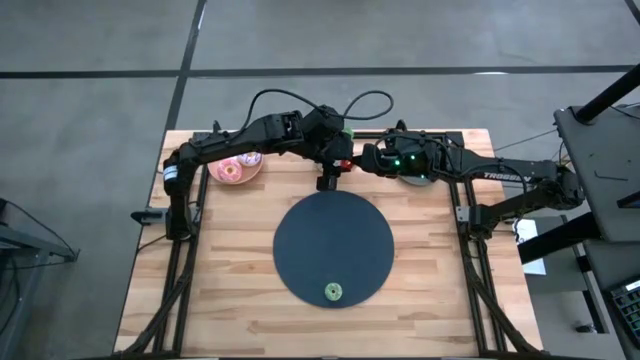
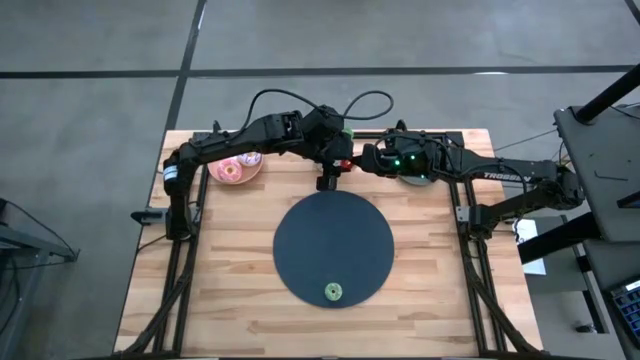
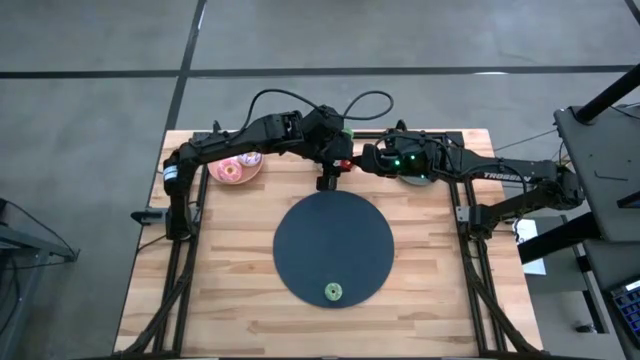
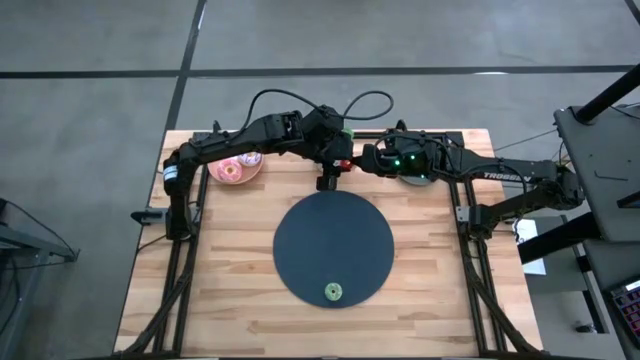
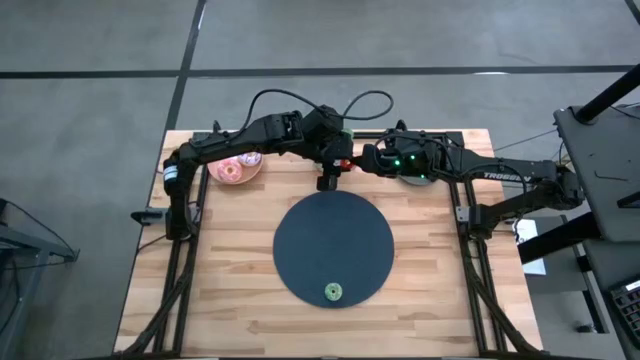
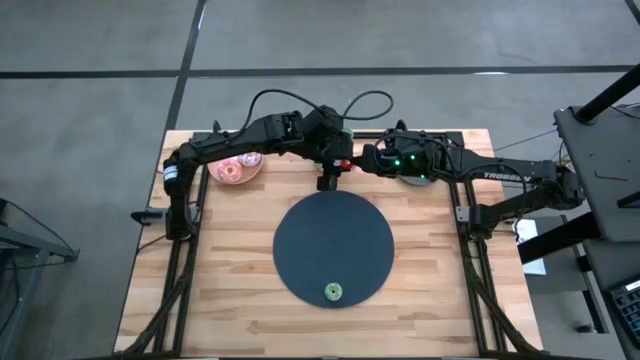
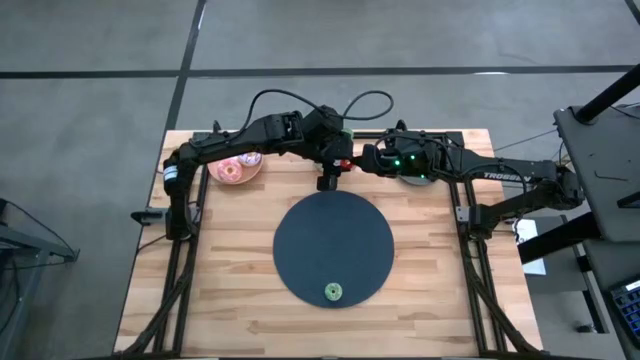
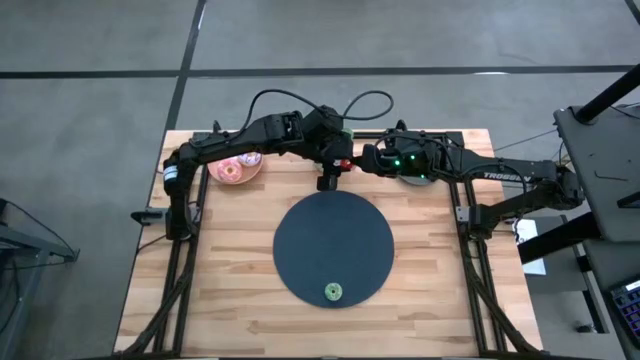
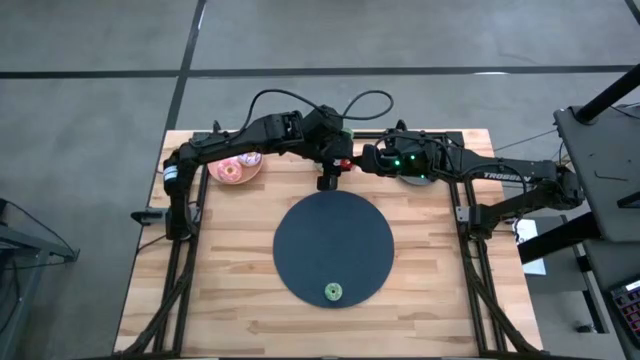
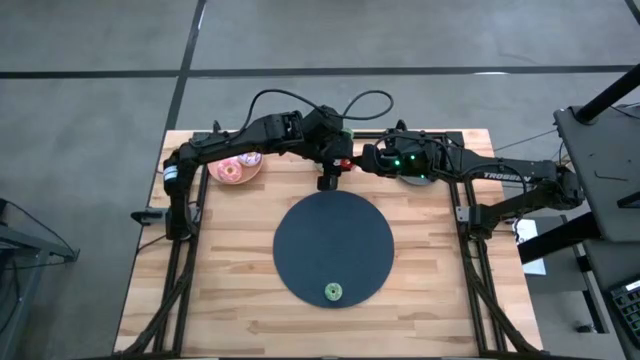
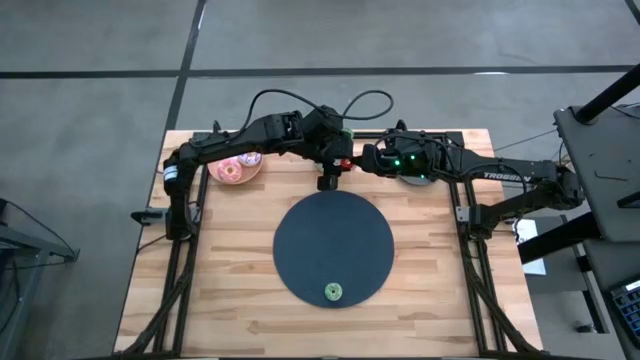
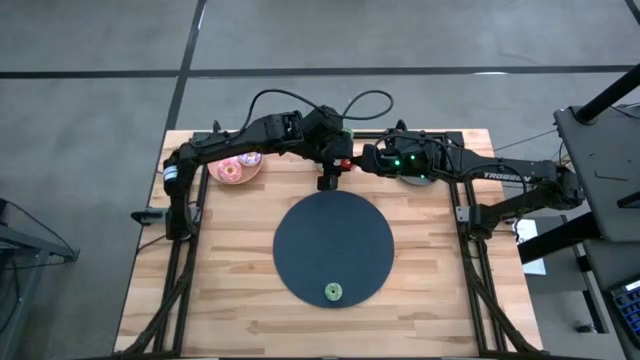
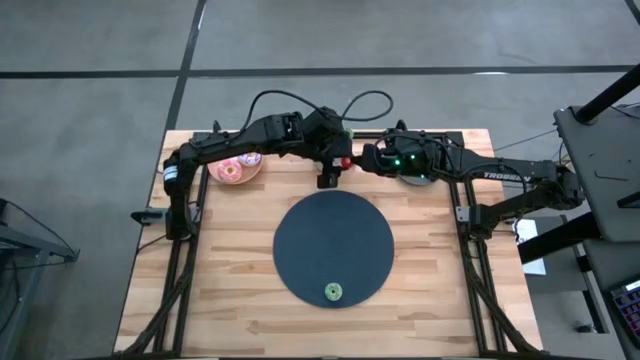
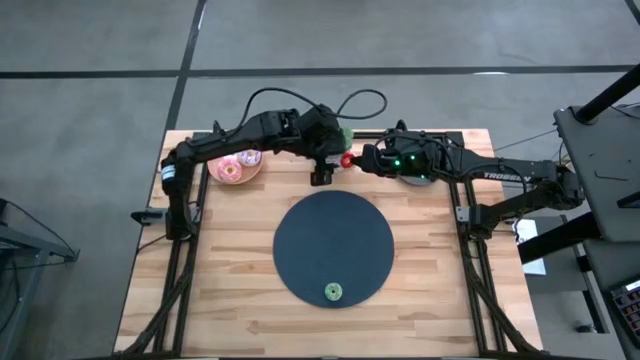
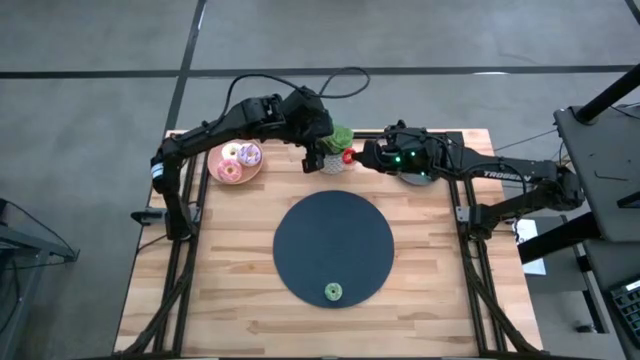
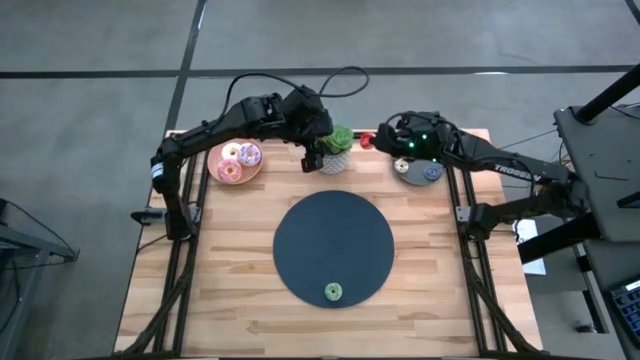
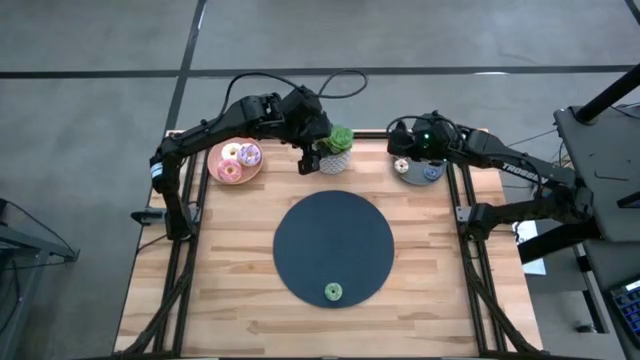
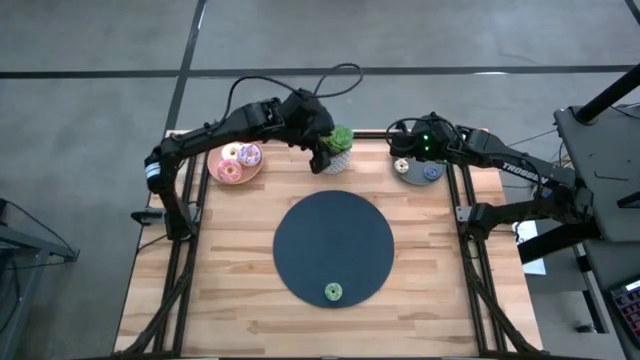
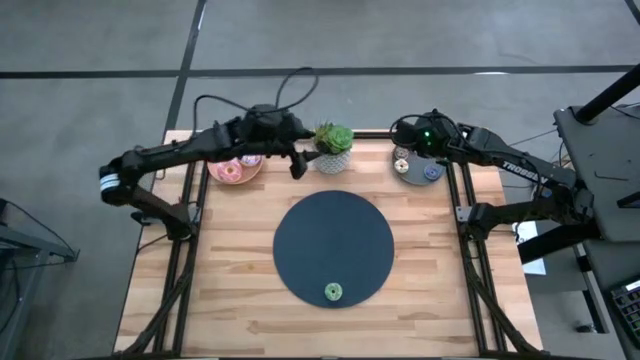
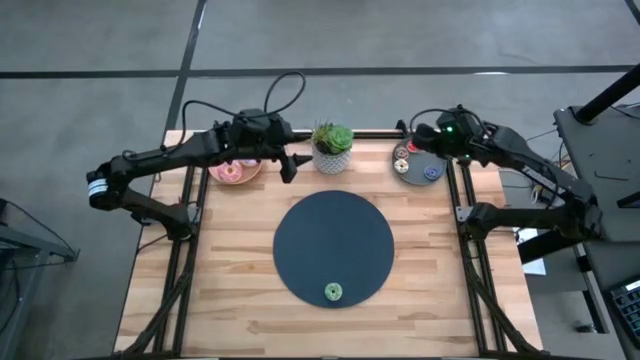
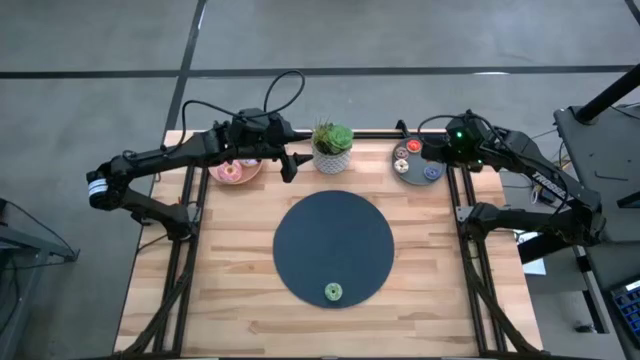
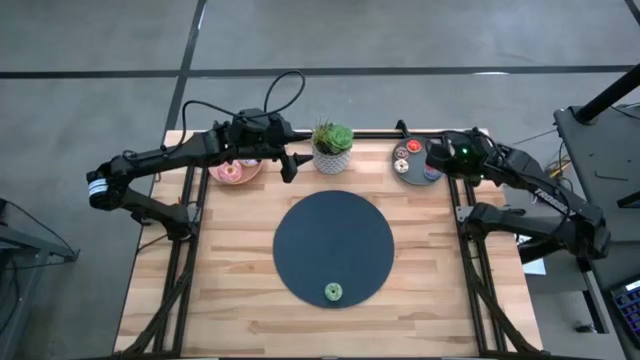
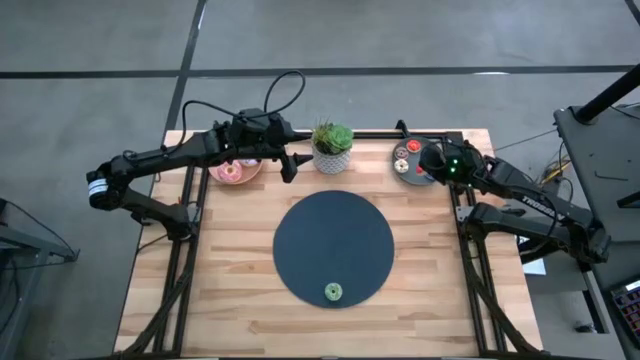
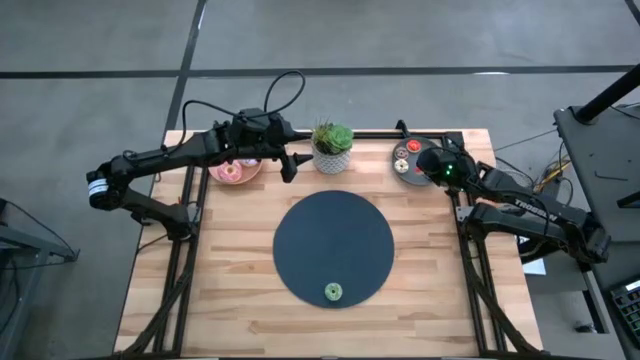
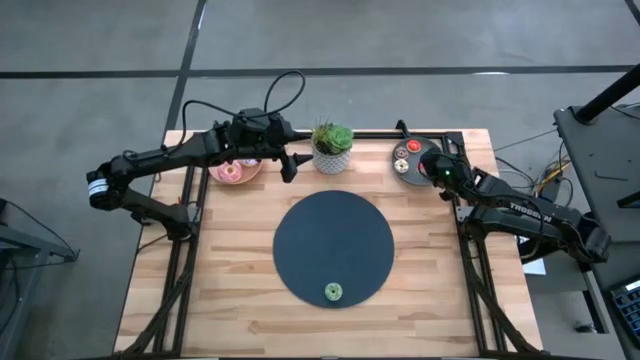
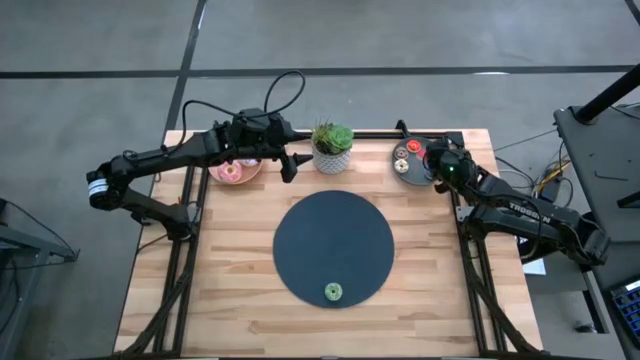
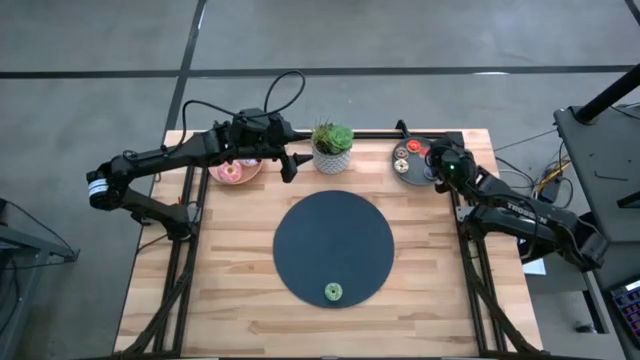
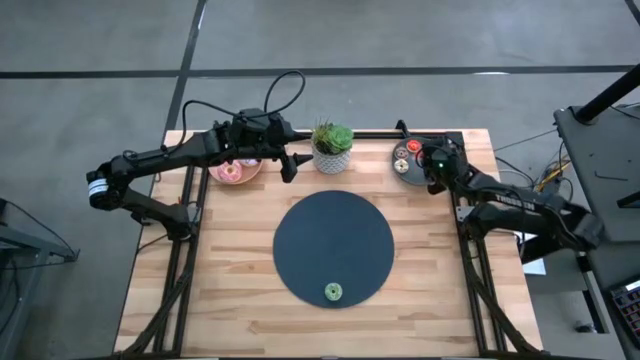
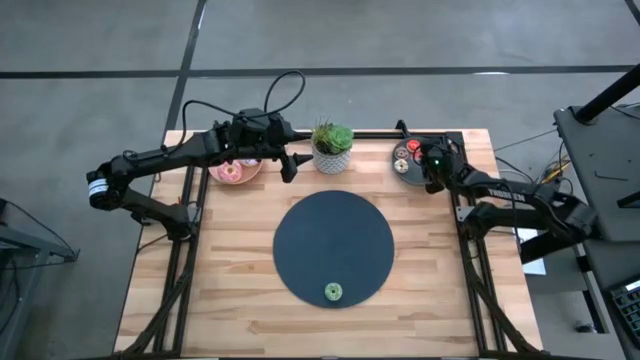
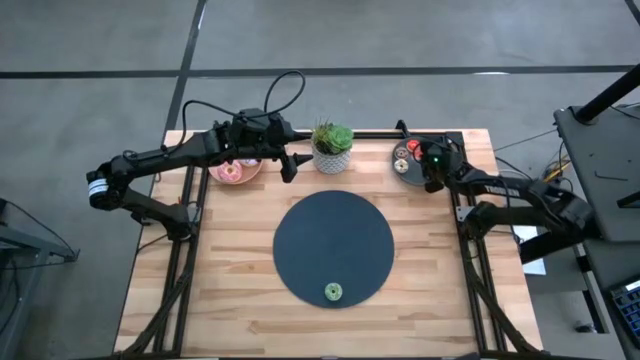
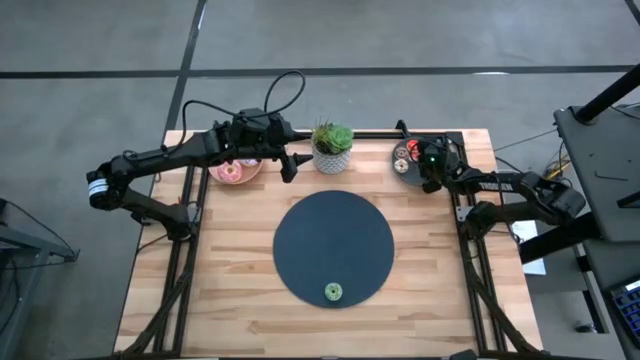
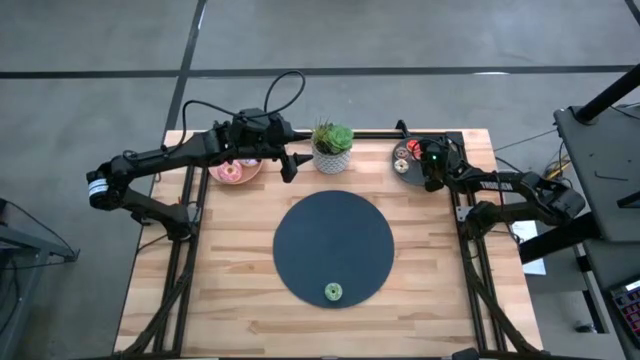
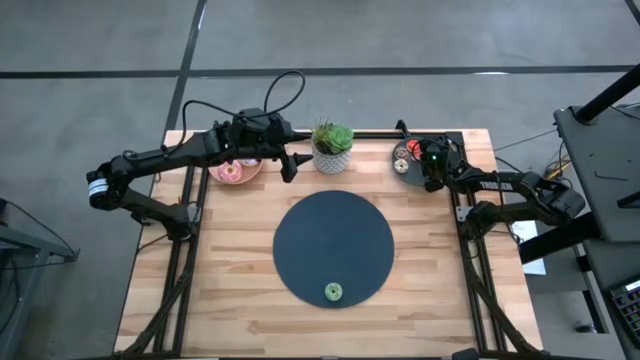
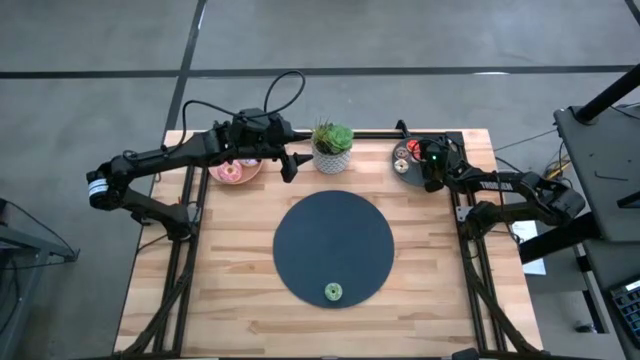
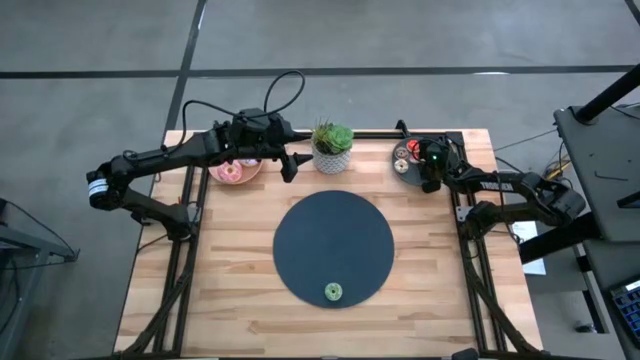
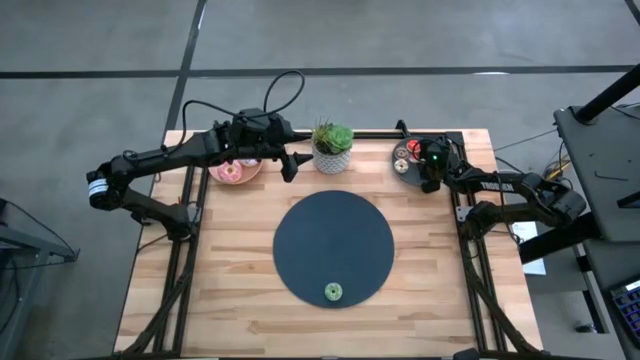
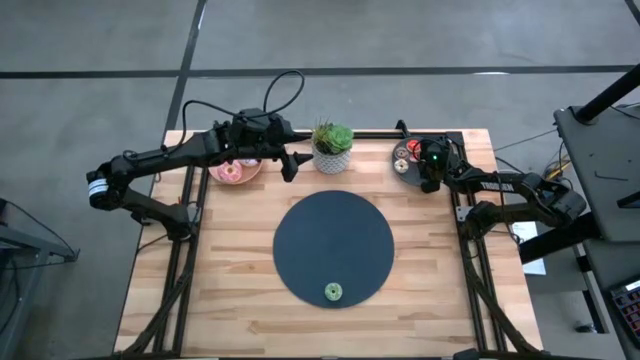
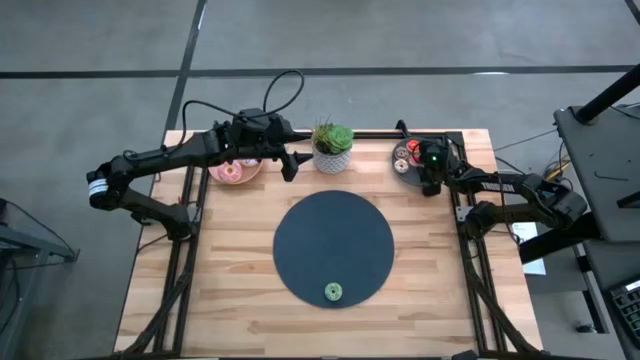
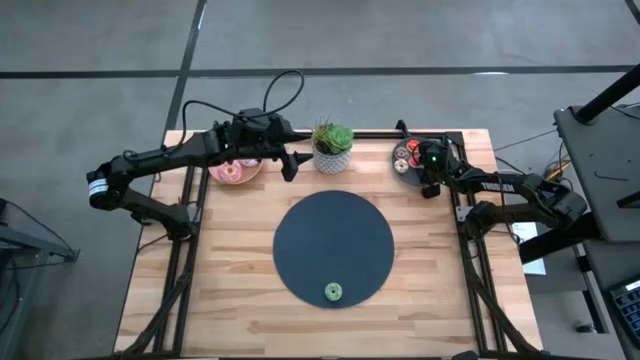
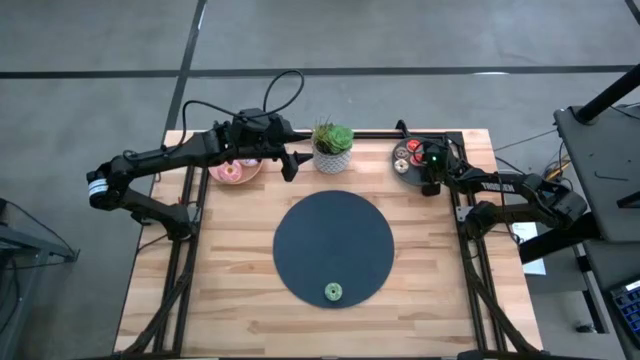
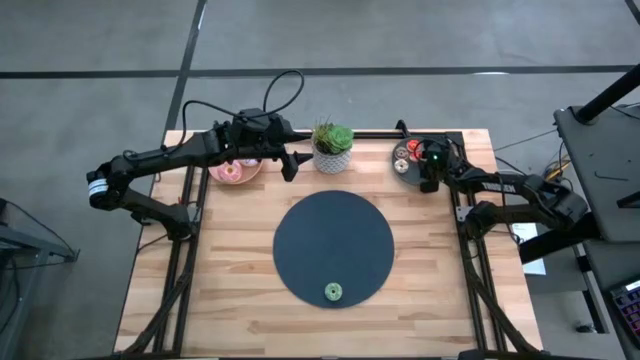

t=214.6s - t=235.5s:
Task: Pick & Place donuts
Put the small red donut on the gray plate
